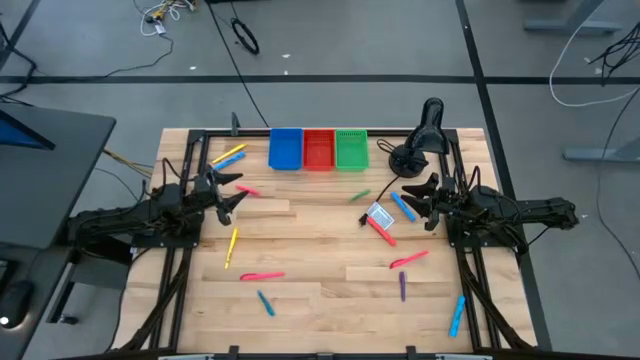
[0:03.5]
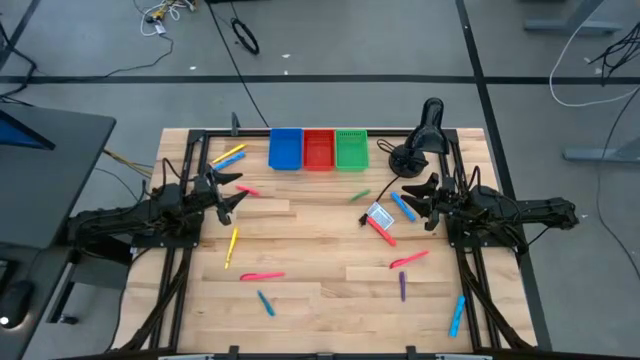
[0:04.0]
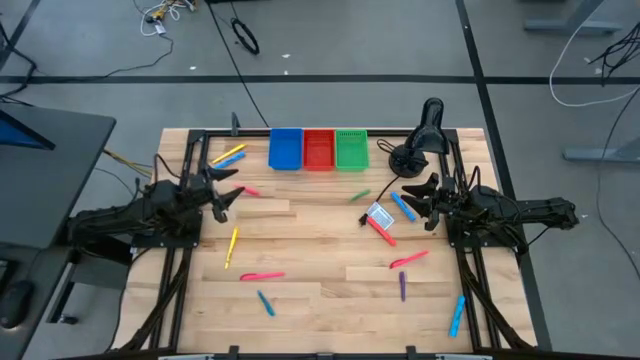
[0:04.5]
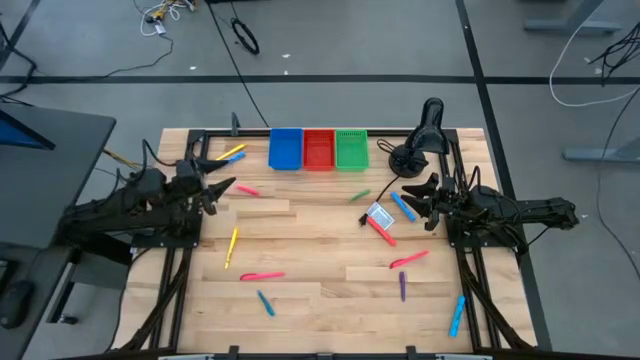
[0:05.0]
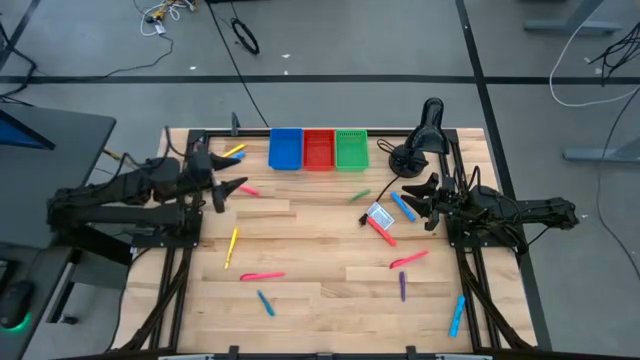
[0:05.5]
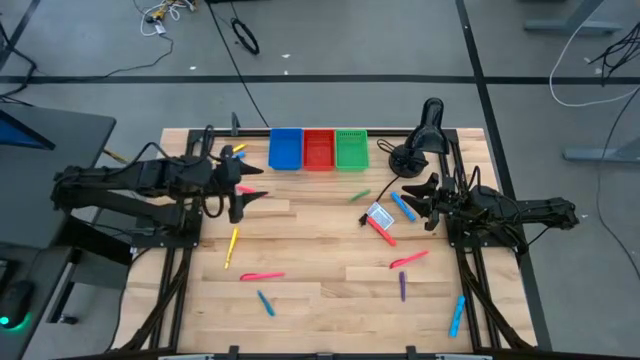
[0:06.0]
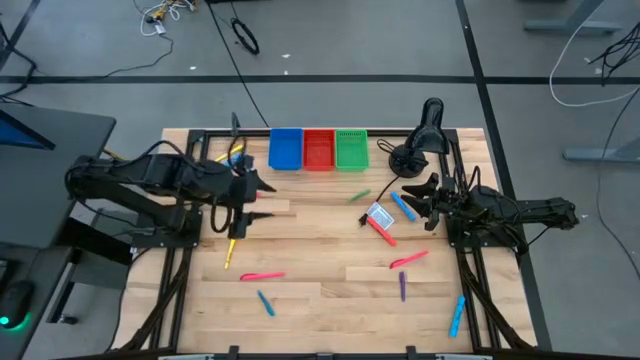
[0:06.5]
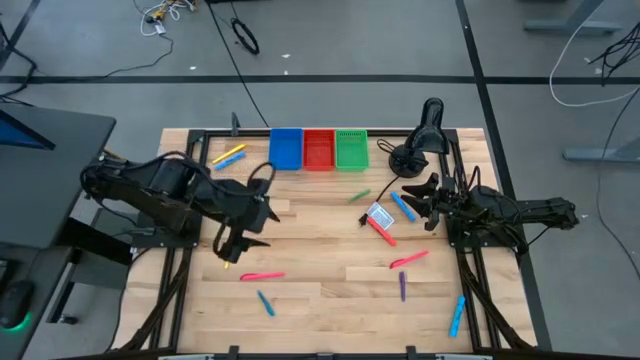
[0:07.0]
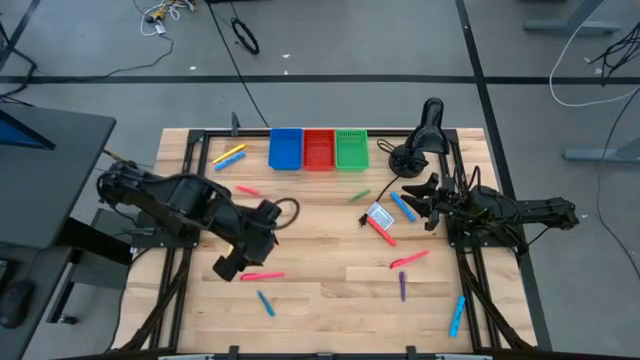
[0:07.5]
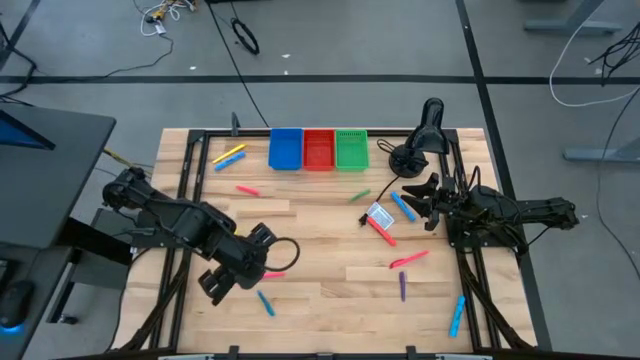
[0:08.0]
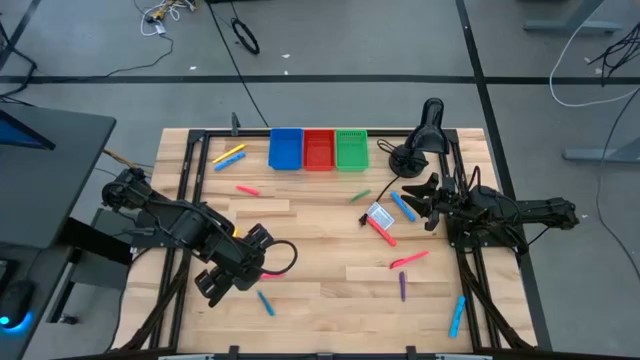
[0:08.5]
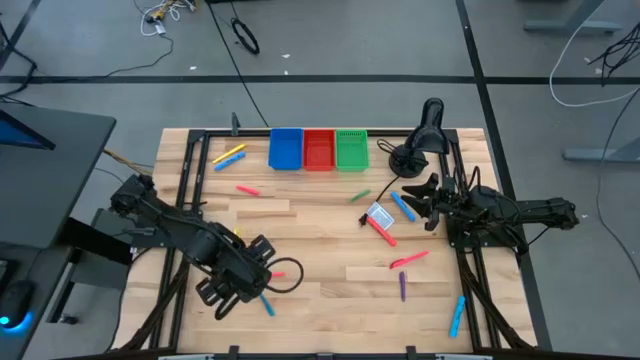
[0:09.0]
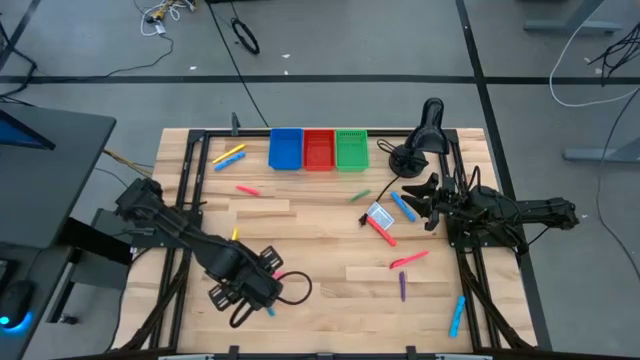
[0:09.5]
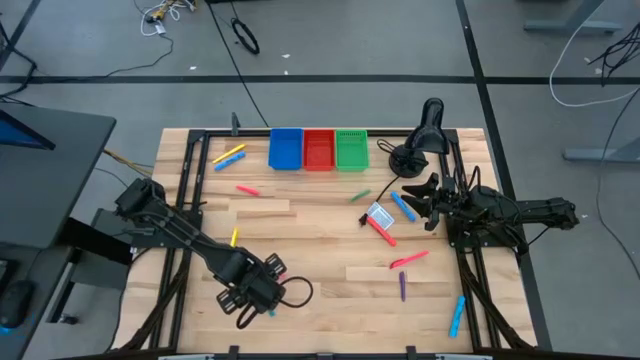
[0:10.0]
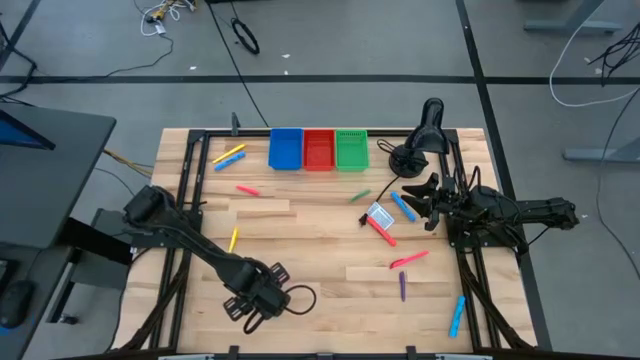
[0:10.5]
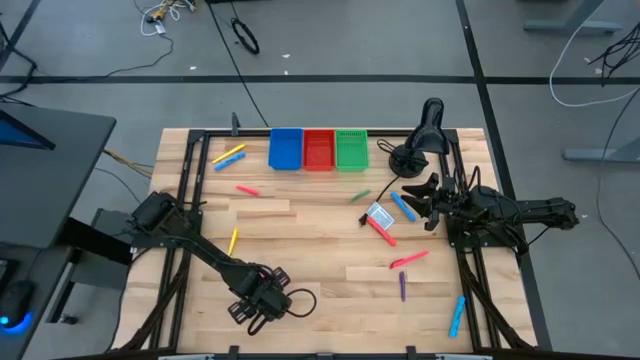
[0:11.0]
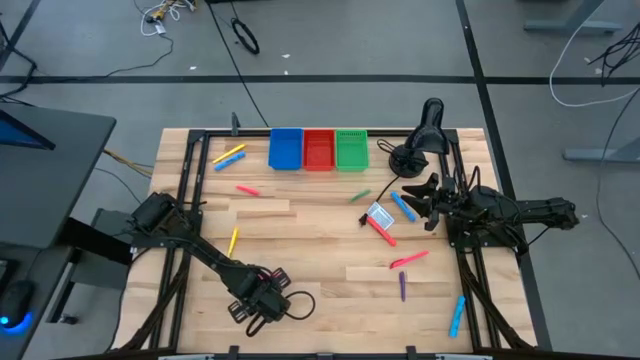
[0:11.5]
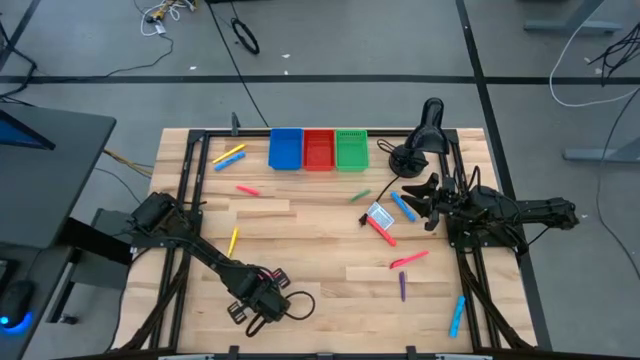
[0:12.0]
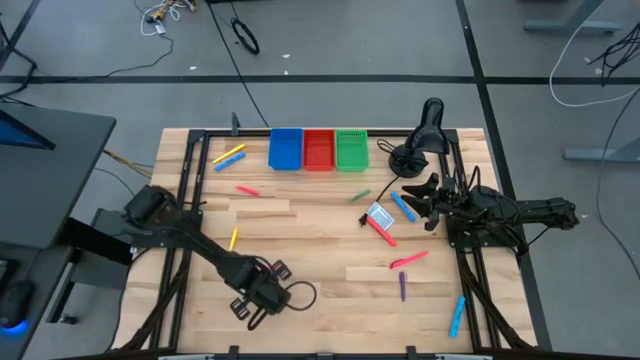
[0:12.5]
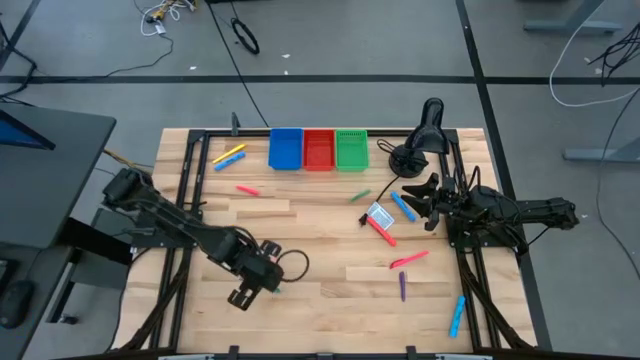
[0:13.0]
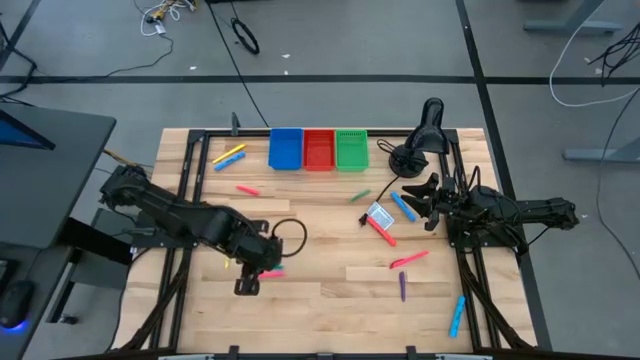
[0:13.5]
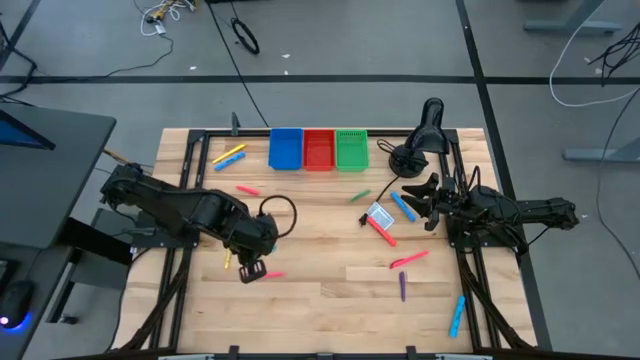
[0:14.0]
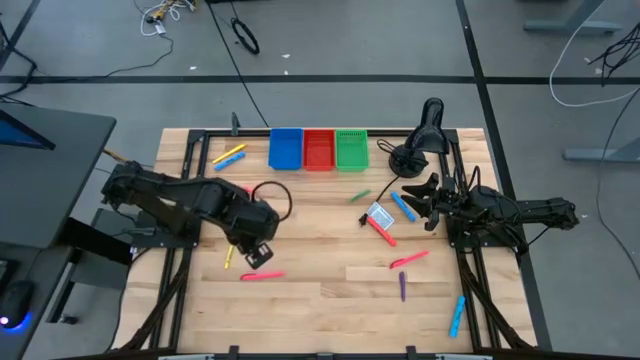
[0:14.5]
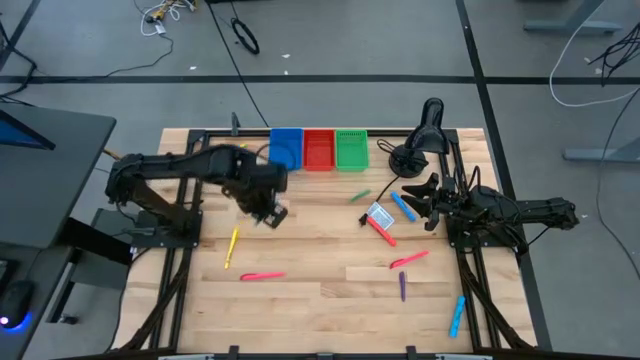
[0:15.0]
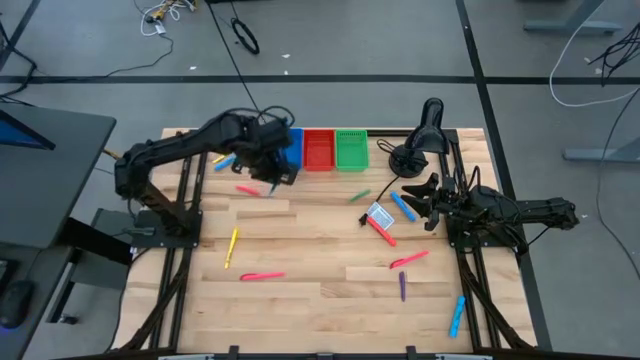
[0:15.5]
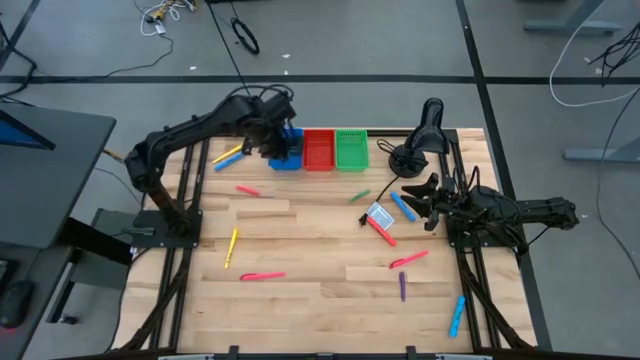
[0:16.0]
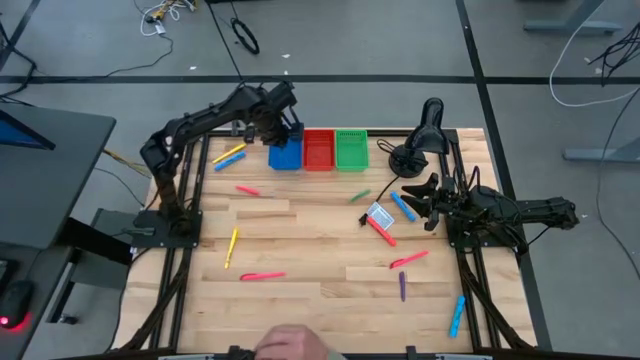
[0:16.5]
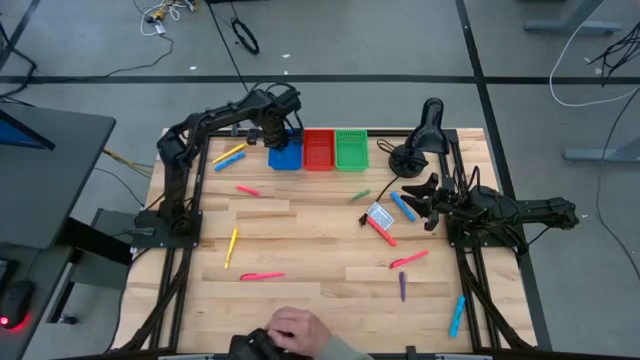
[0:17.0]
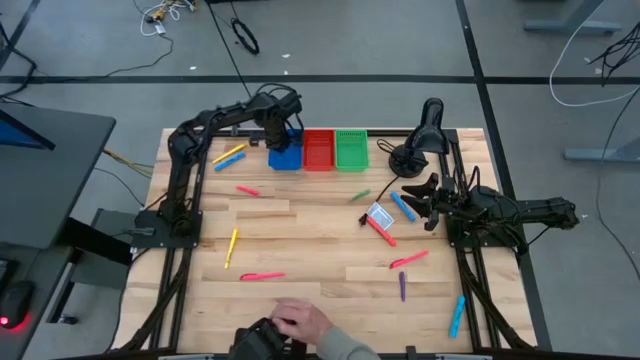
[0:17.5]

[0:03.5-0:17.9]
Task: Pick & Place Markers
Put the blue pen into the blue bin
